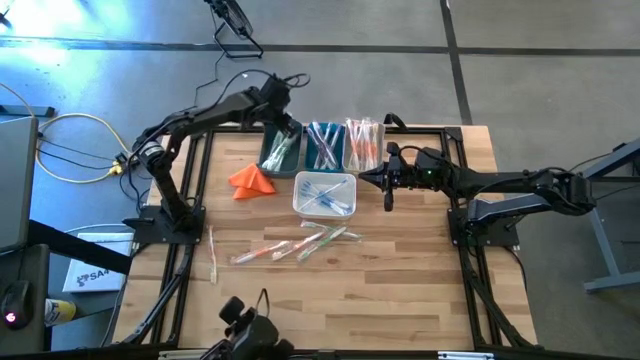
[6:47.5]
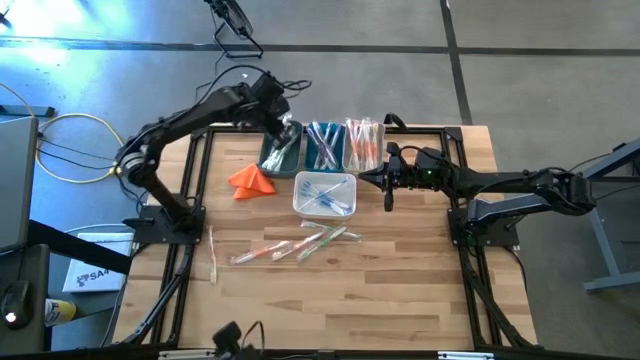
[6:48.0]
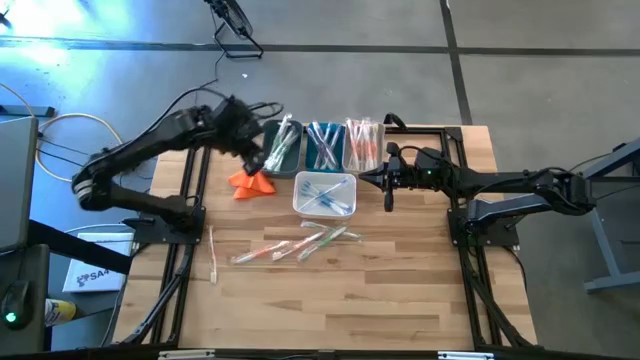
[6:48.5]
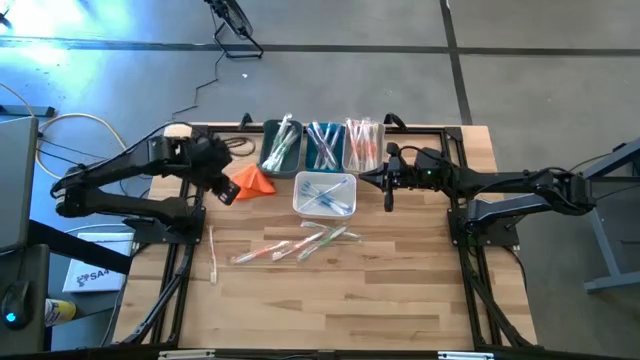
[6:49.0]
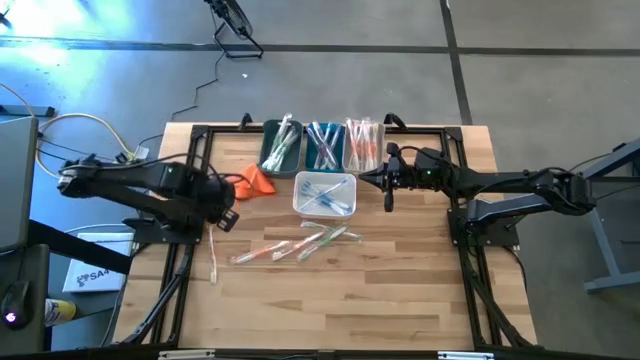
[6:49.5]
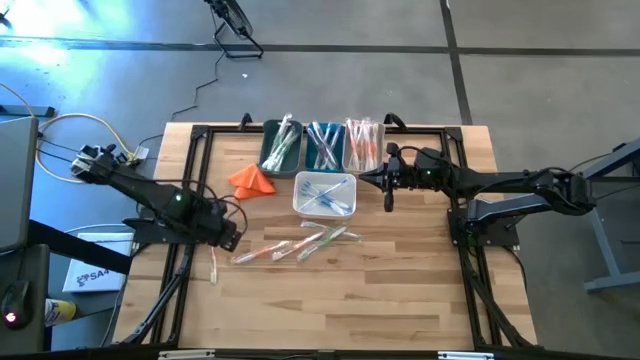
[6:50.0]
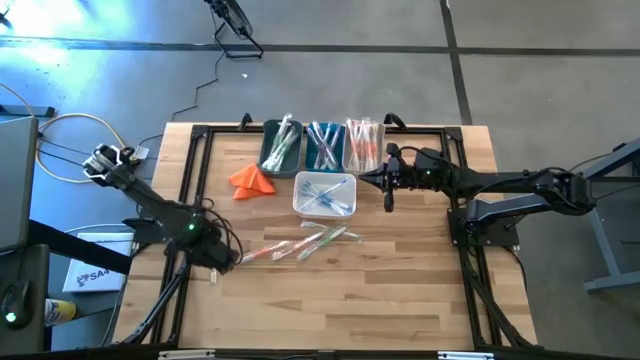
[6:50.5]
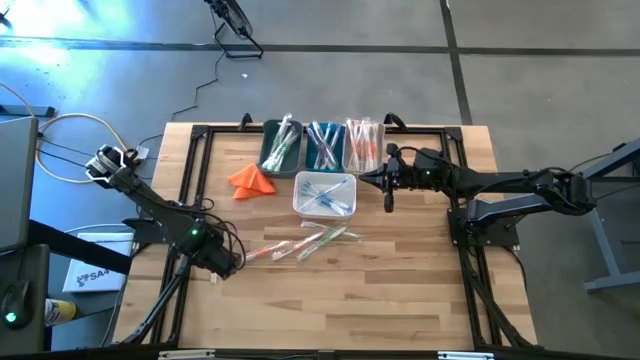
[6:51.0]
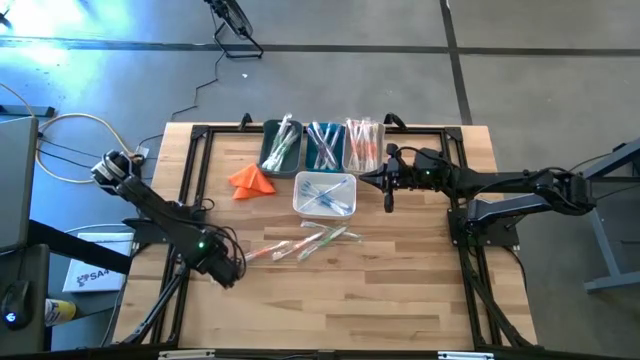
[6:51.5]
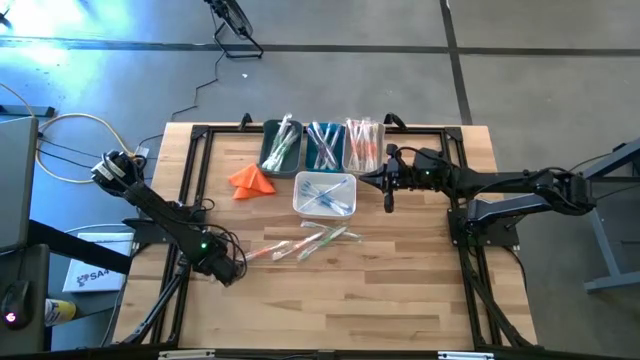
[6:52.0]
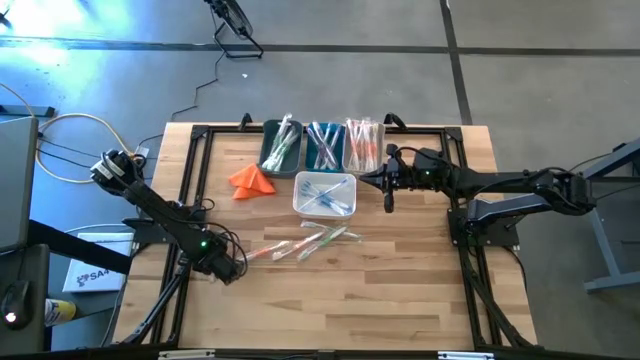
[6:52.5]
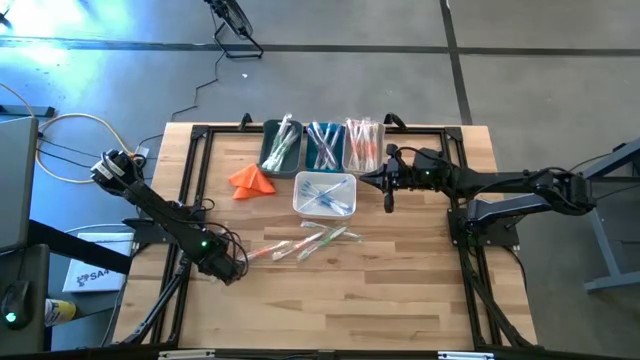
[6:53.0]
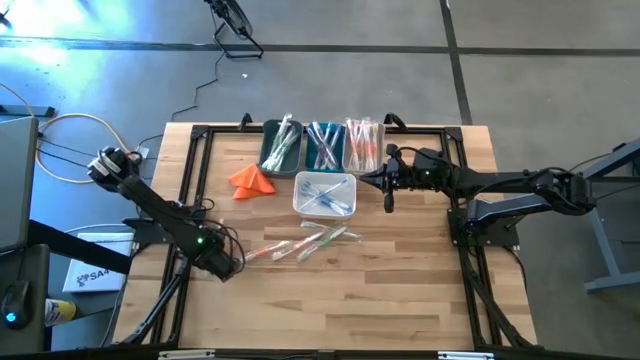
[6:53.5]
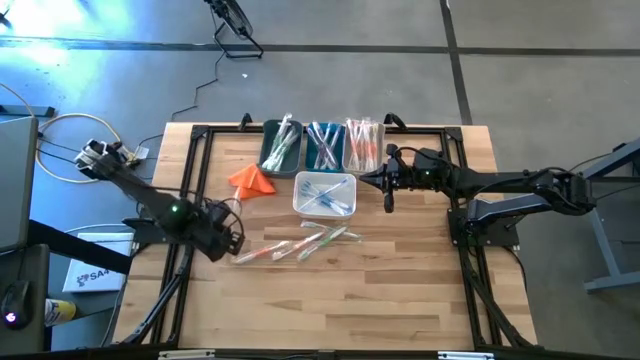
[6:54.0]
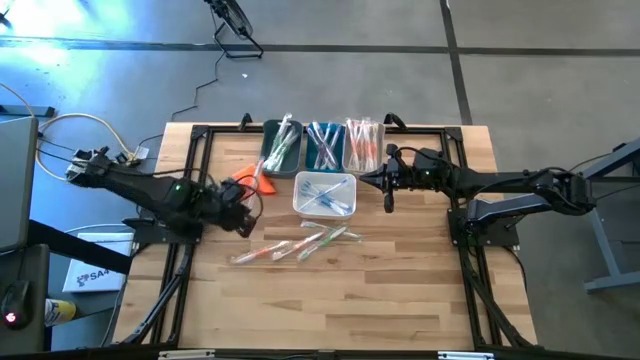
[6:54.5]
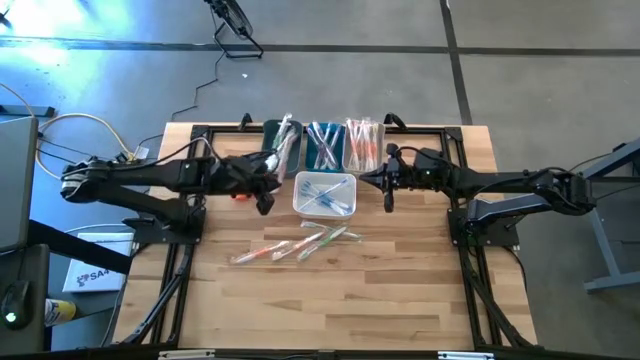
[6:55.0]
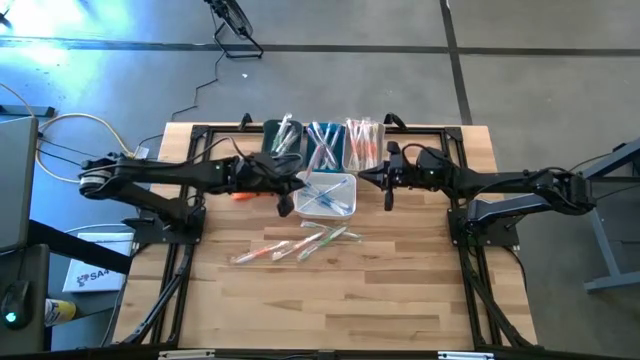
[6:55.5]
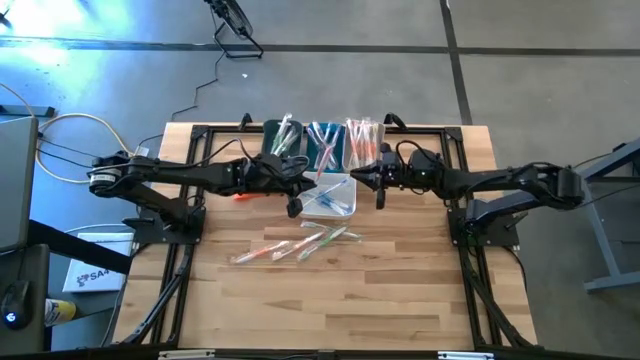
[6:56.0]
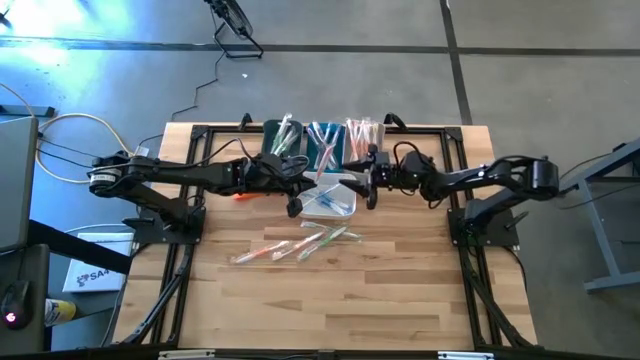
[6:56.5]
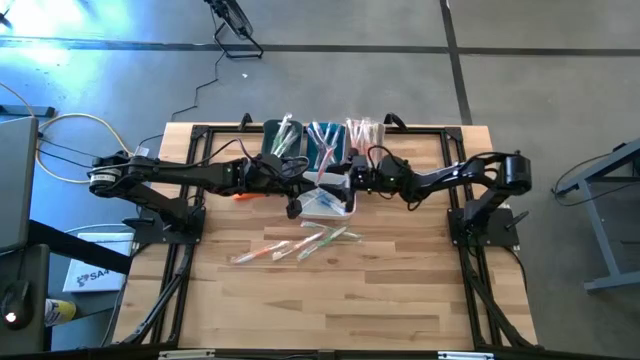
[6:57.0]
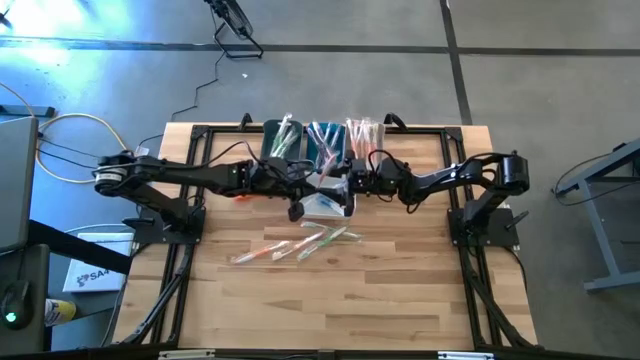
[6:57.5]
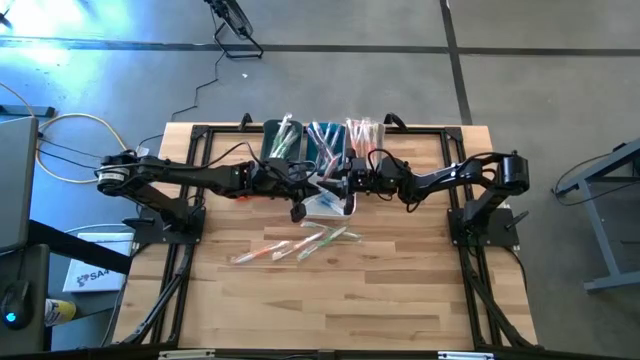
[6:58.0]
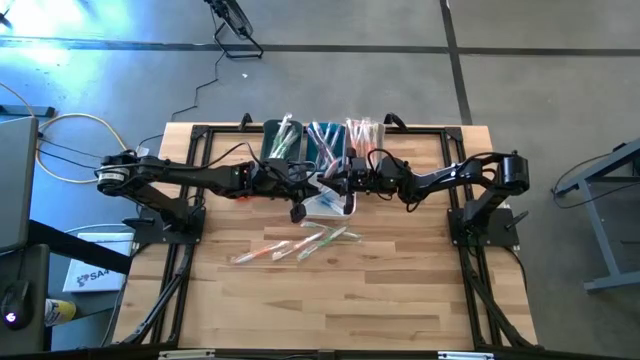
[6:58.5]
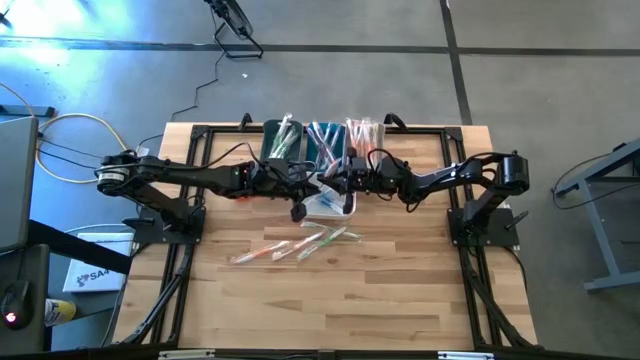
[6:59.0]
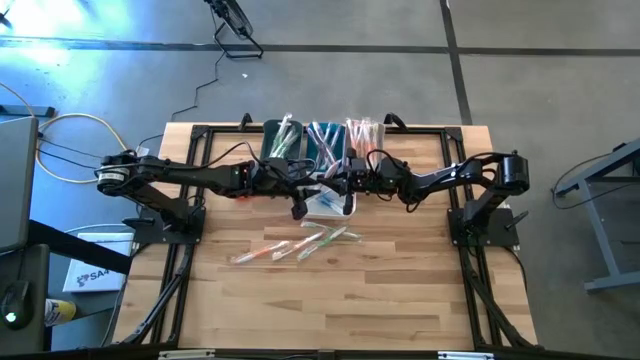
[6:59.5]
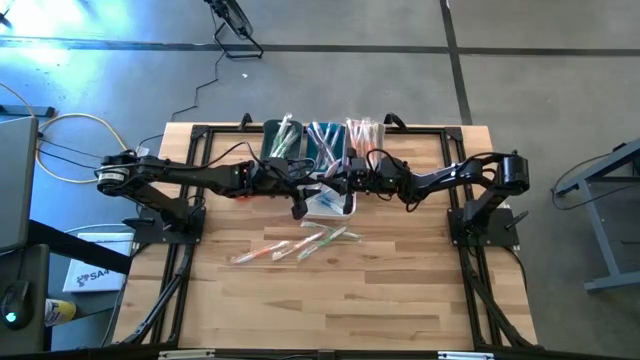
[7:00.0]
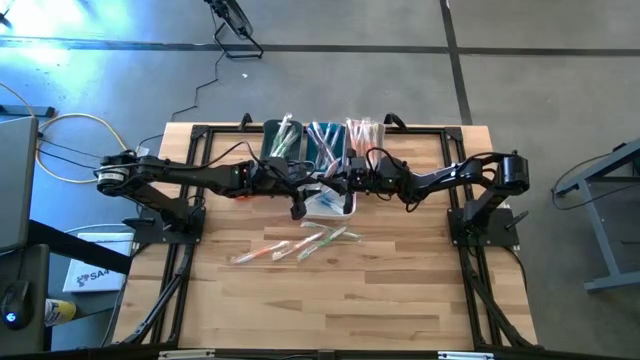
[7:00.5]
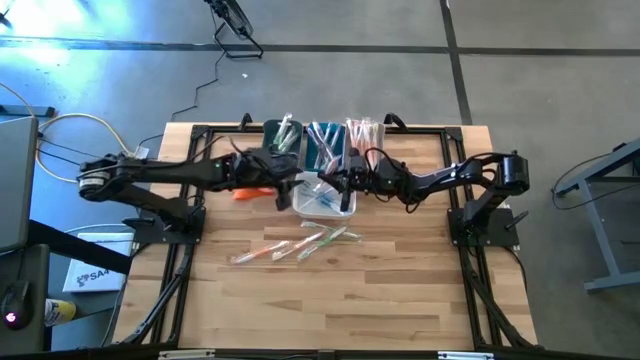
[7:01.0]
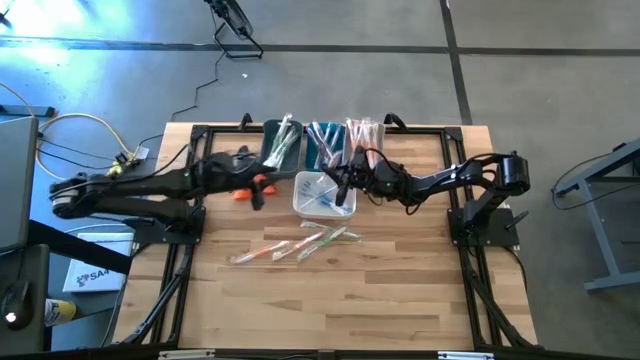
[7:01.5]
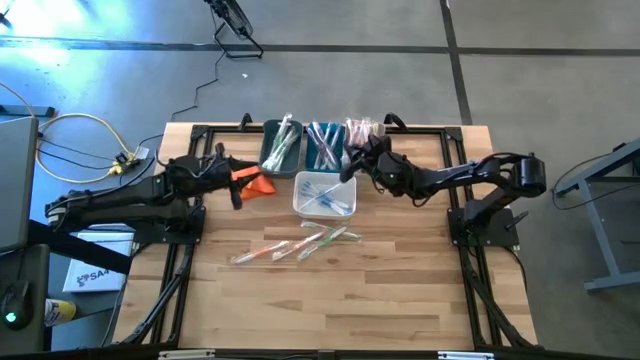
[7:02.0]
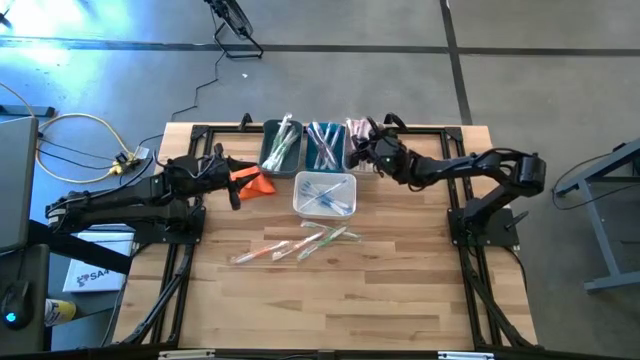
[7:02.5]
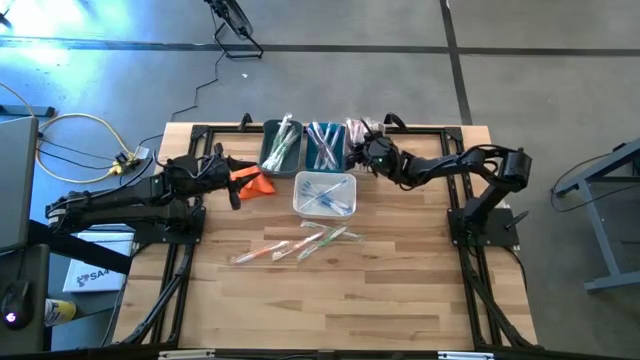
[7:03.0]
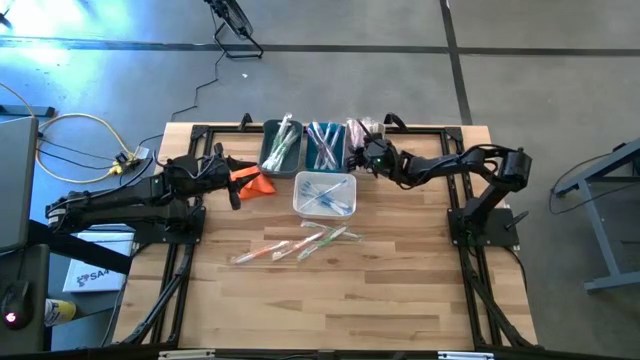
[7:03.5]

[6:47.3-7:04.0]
Task: Pick & Place Toothbrushes
Put the orange toothbrush into the gray bin

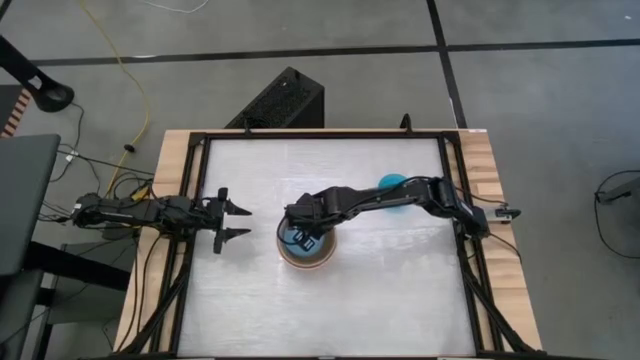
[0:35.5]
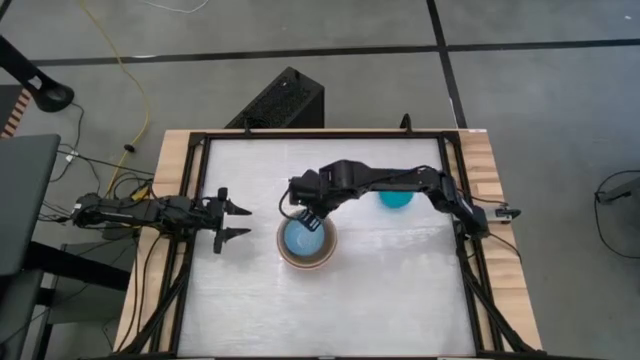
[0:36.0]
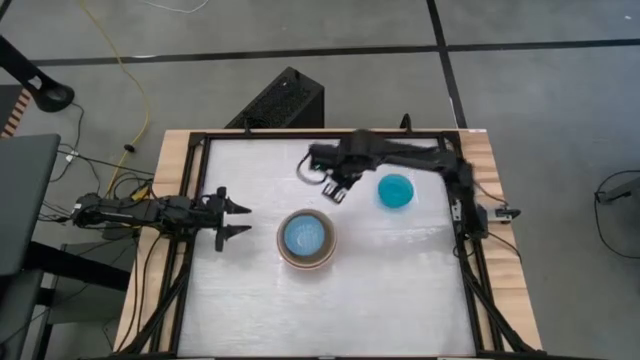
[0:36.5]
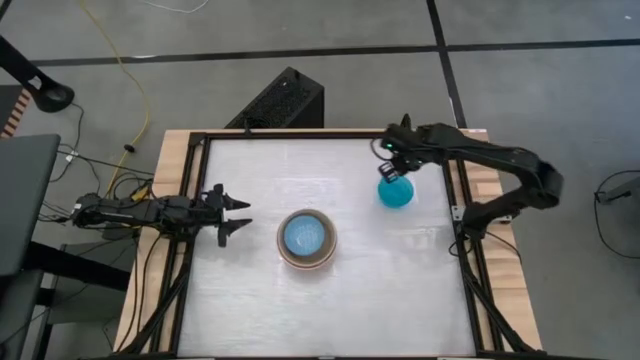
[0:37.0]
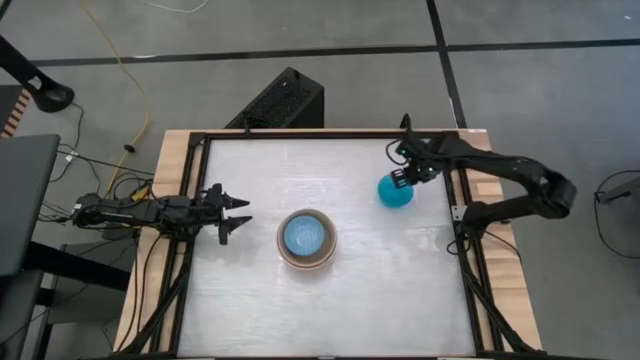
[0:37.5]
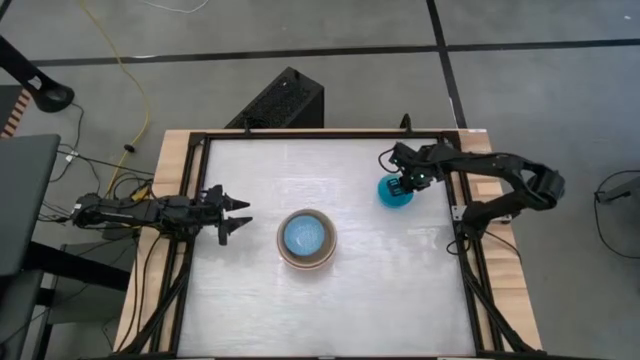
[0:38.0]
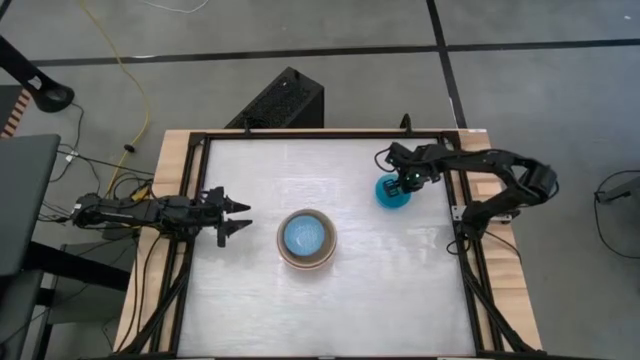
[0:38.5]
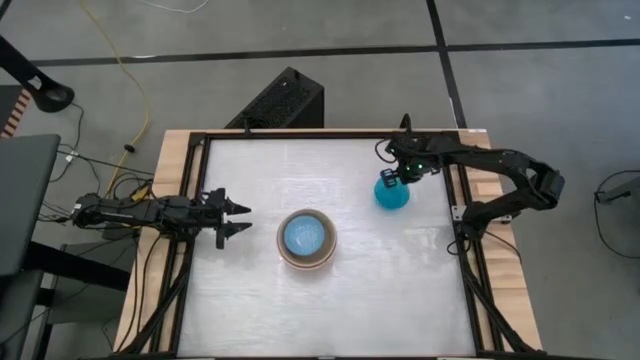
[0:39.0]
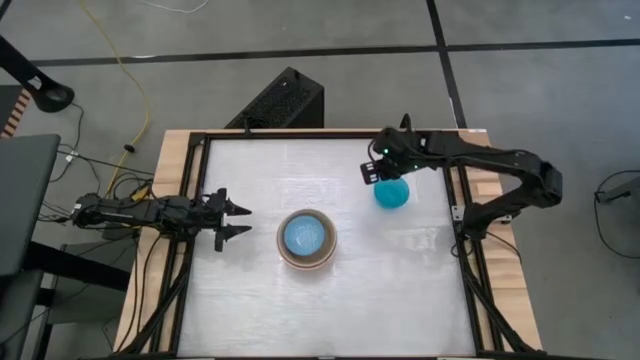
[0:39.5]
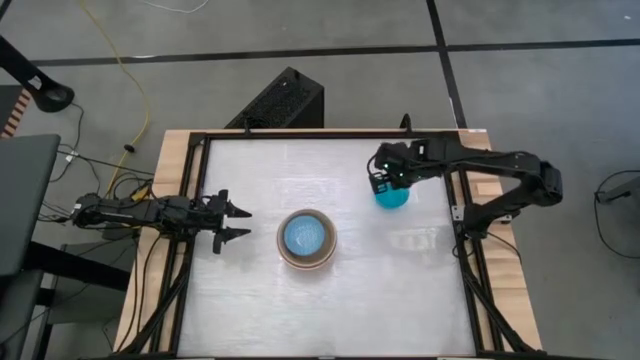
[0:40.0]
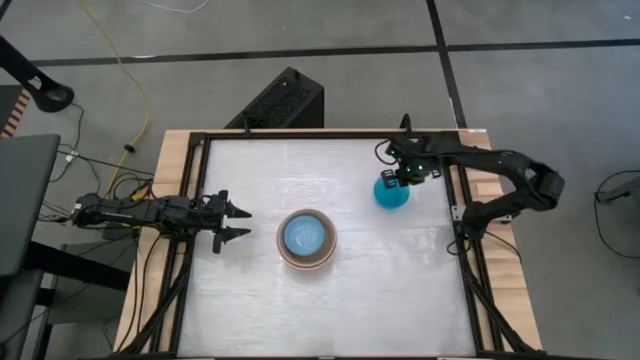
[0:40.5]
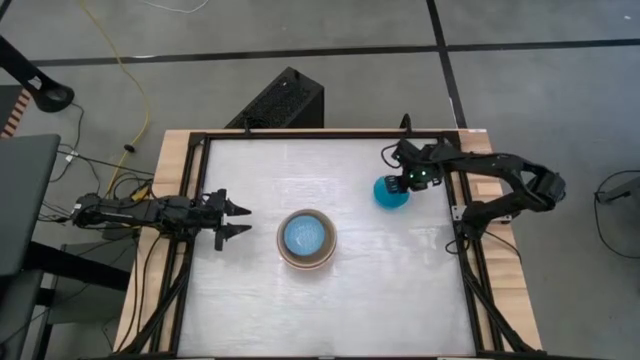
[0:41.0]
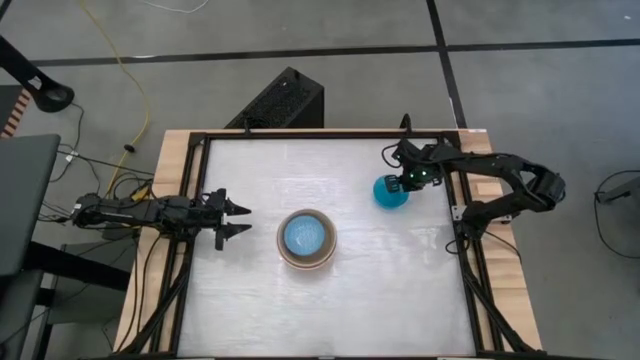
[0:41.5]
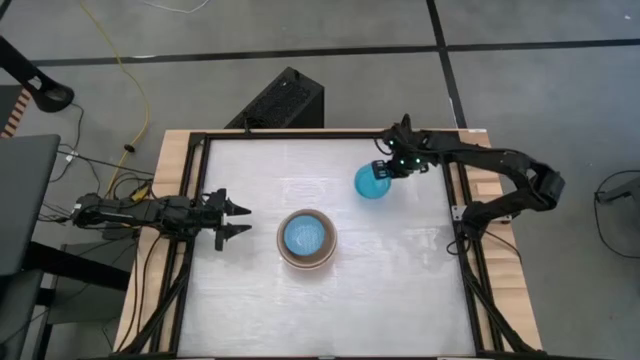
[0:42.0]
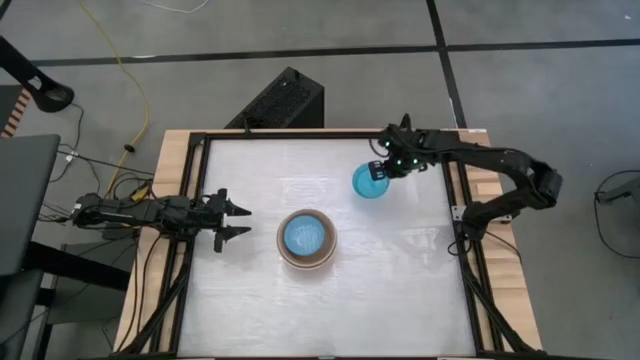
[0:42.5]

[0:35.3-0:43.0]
Task: Nest bowls inside each other by size order
Stack the transparent blue bowl on top of the blue bowl
